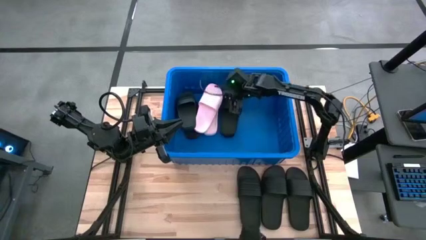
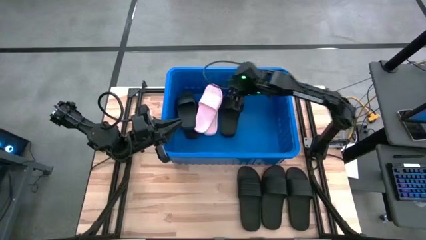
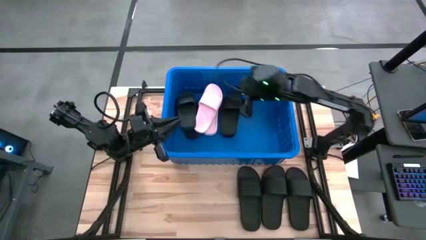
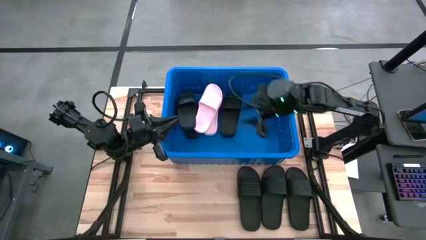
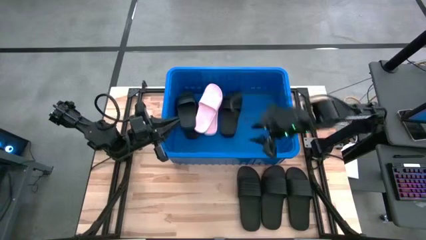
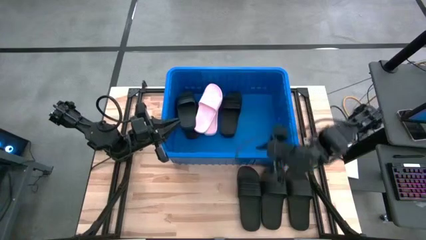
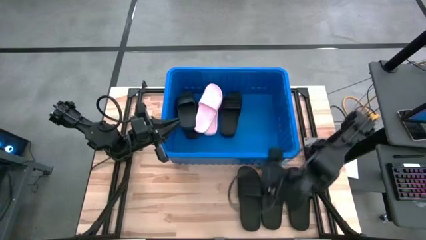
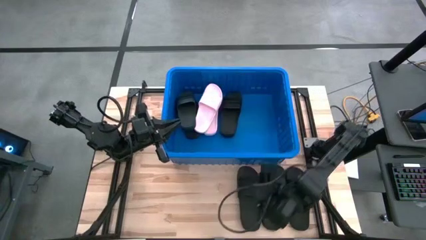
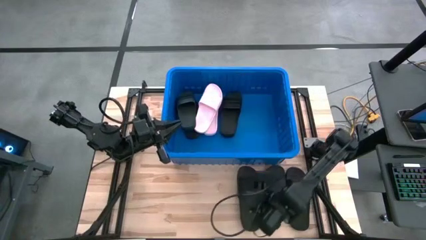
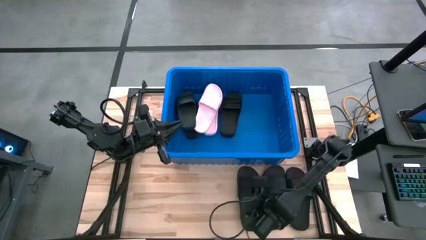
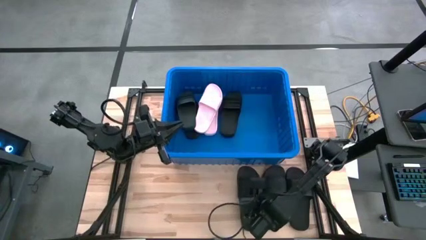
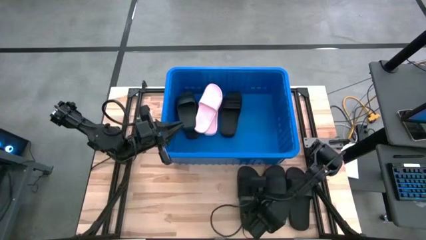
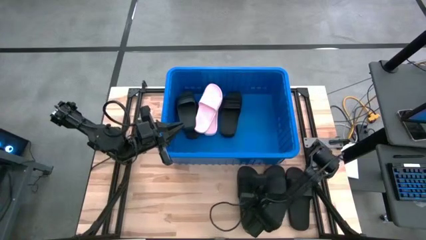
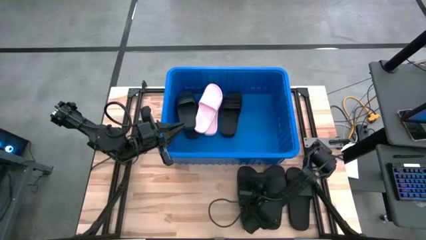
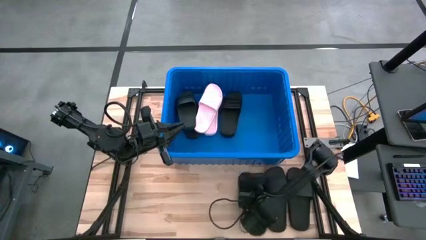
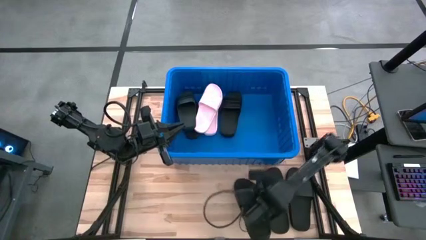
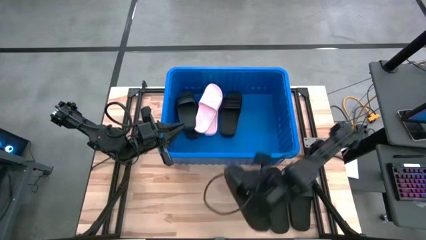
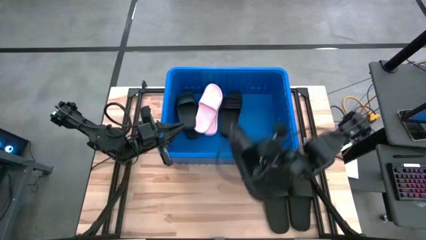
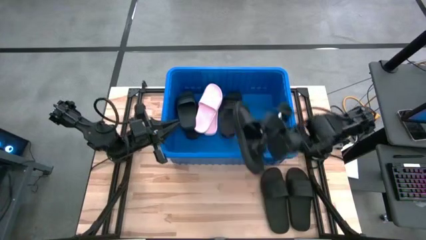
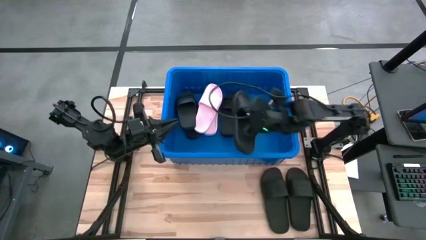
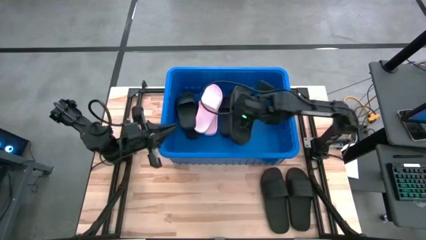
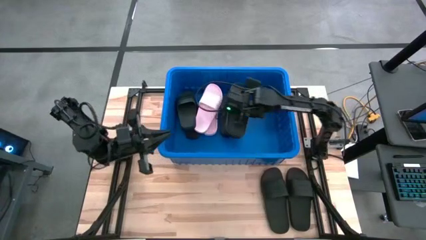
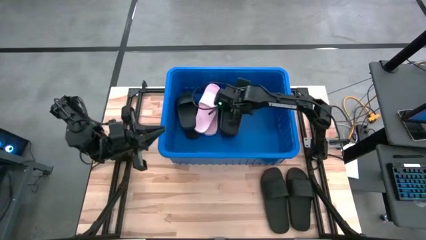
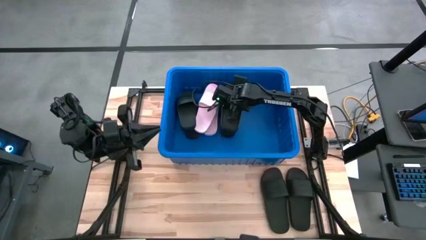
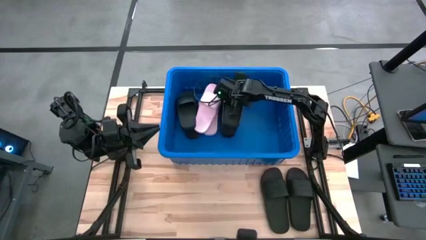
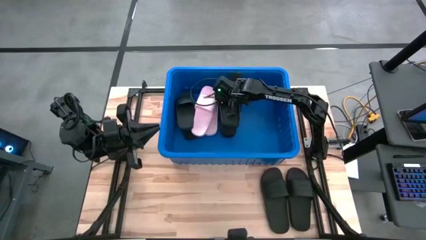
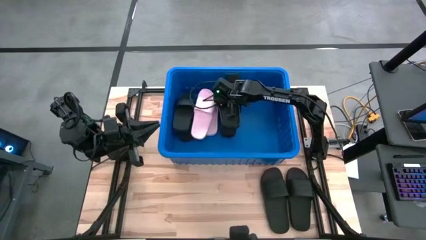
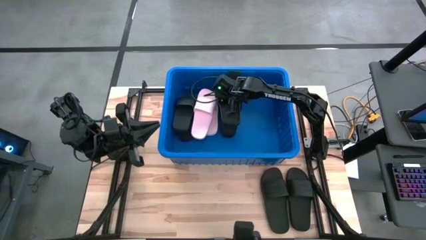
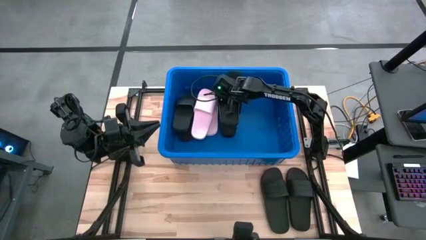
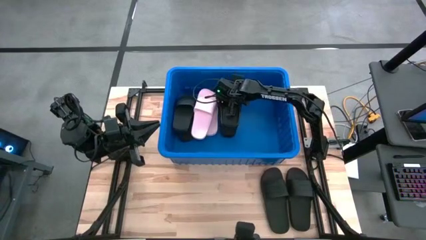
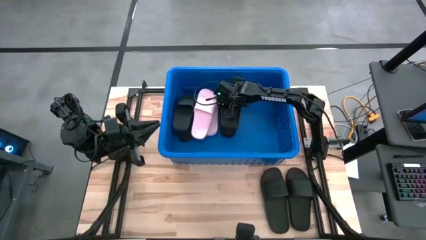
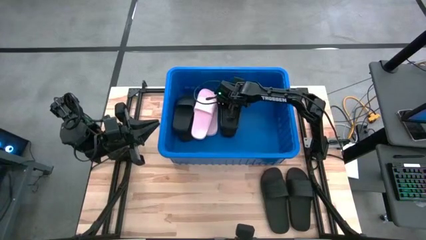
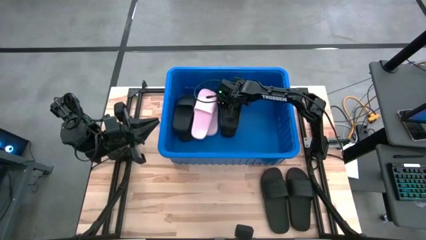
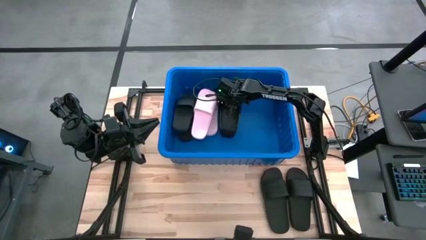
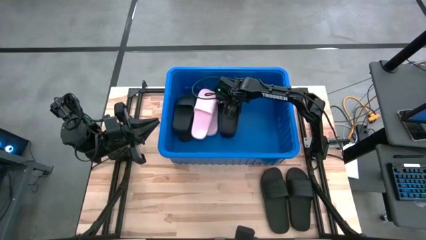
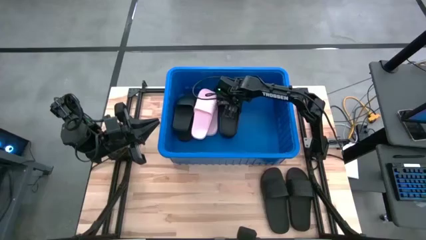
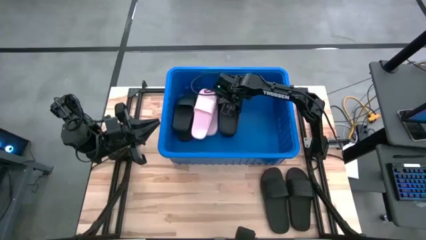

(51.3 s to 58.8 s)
Task: Pick and place slides into bin
Put the black slide into the blue container

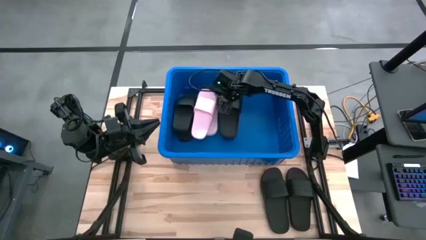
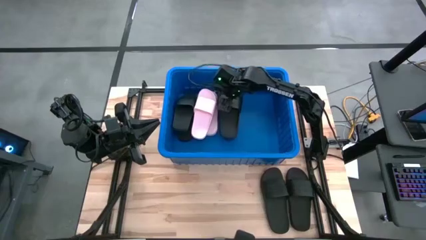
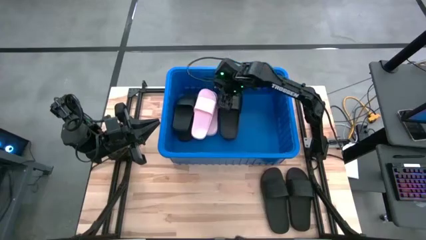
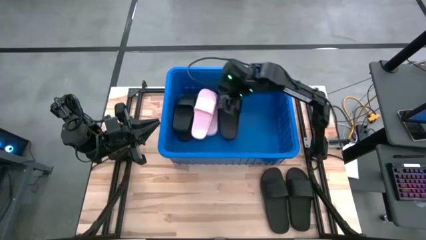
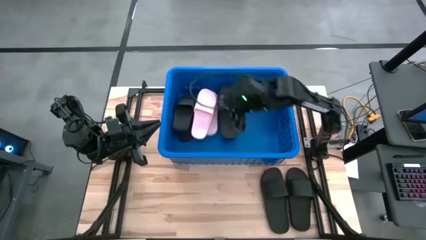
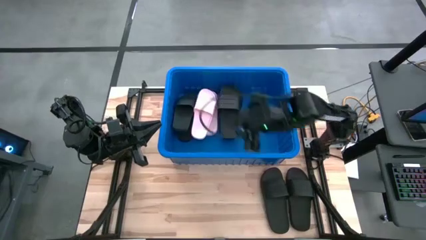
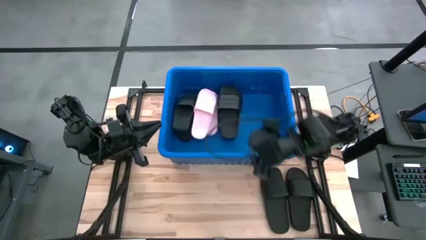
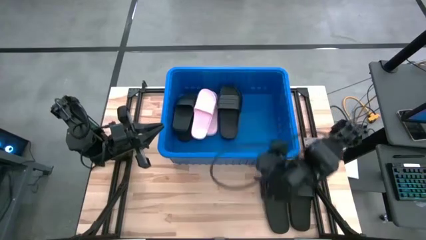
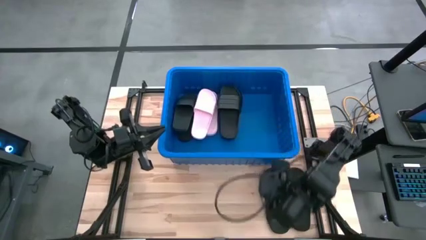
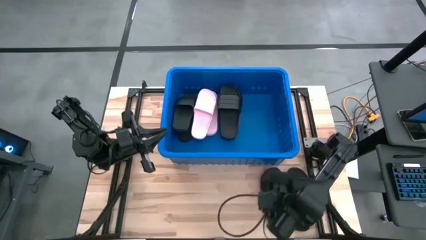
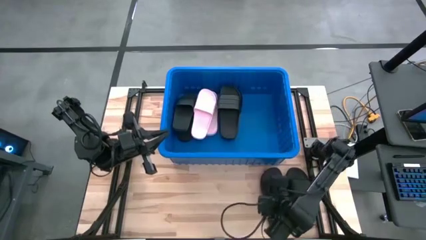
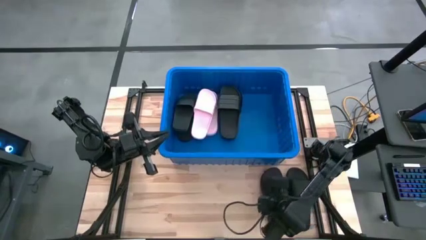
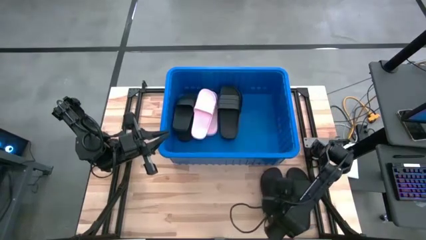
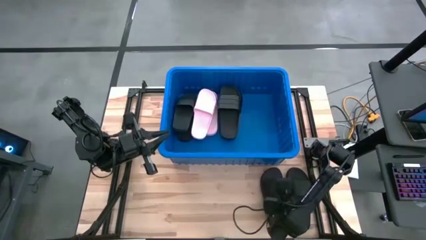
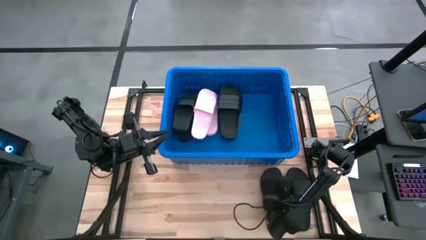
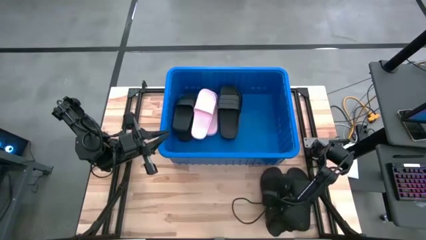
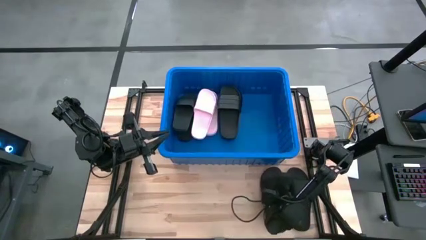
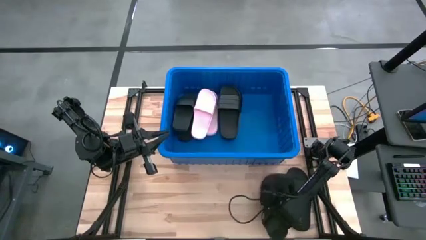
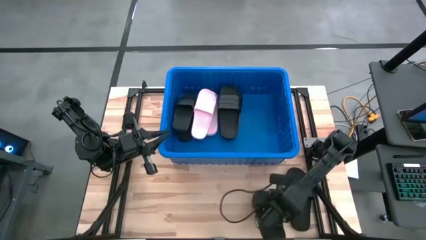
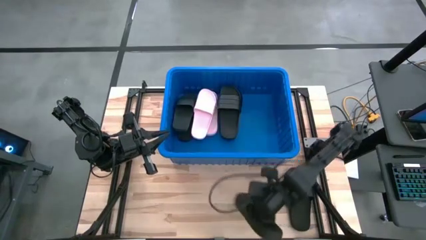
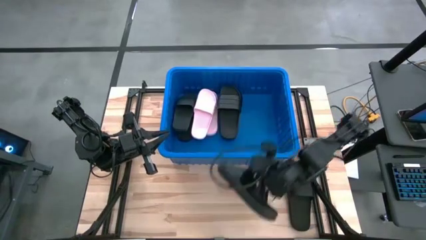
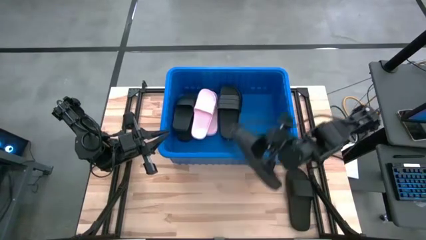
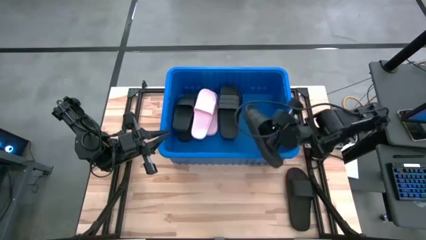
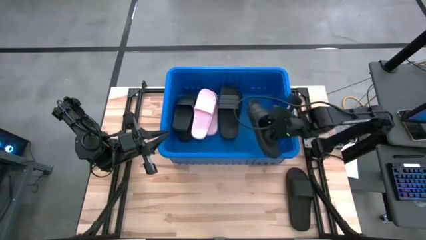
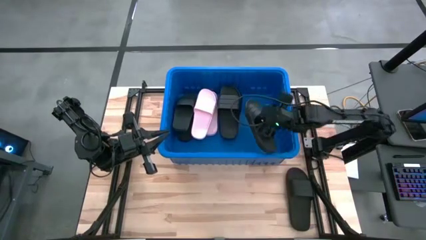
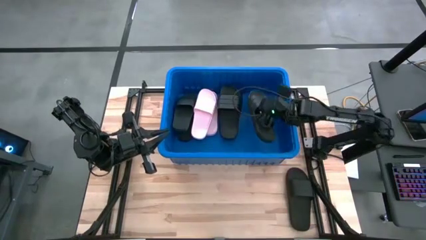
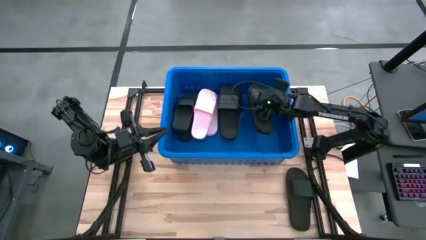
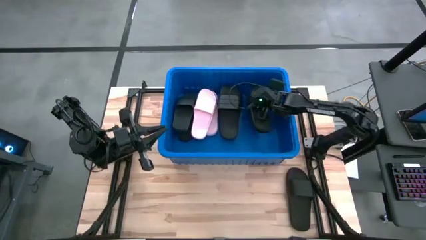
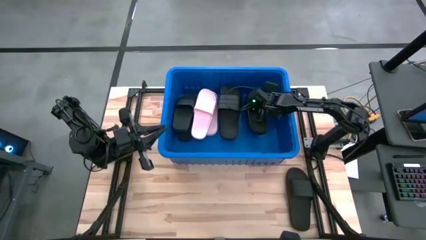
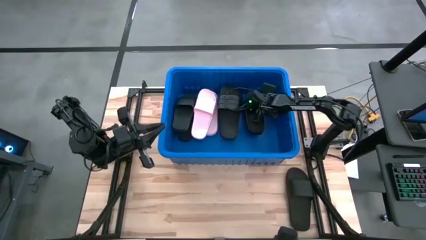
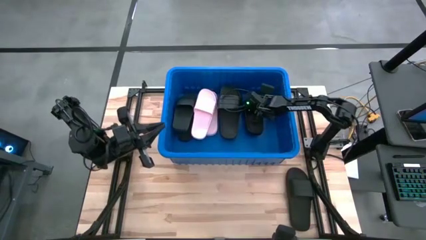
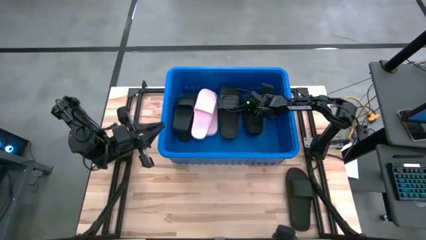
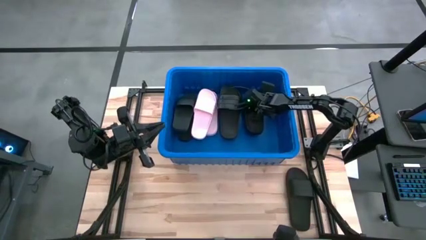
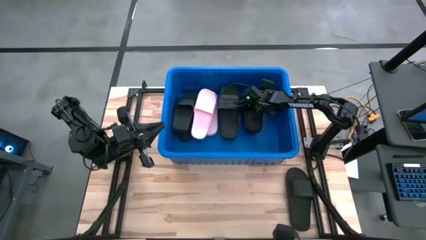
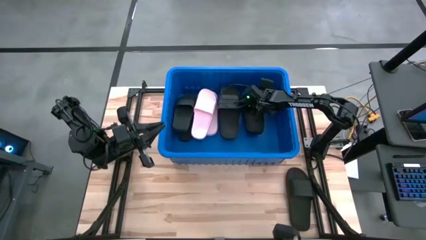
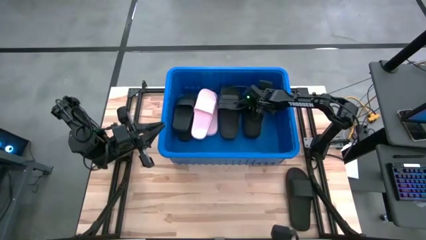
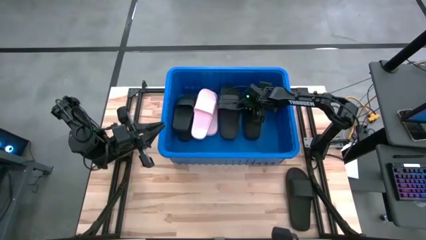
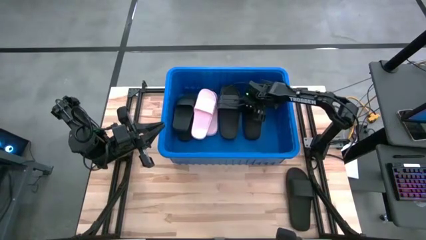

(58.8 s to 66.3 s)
Put the black slide into the blue container
